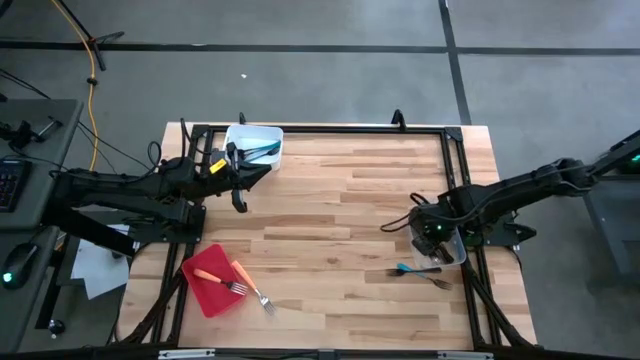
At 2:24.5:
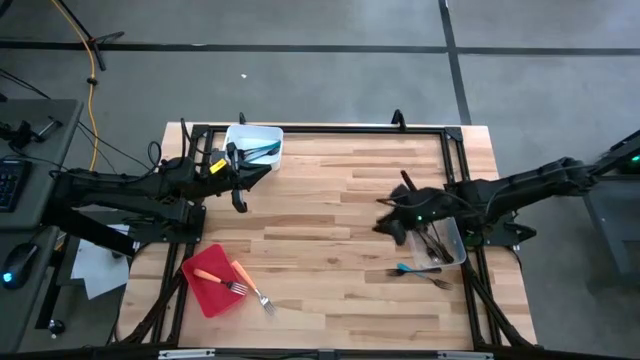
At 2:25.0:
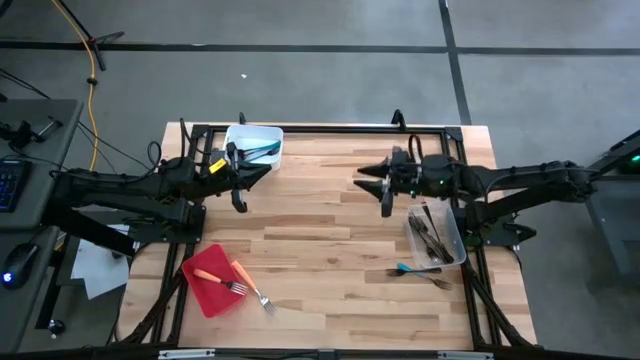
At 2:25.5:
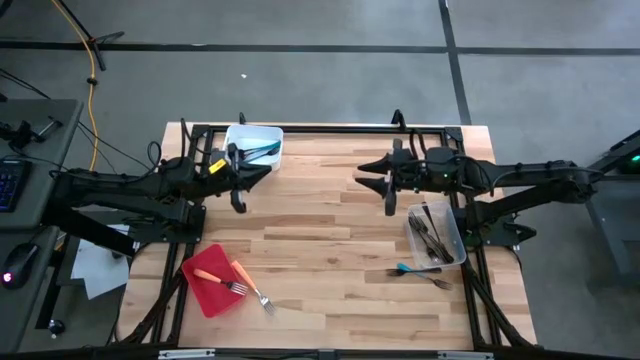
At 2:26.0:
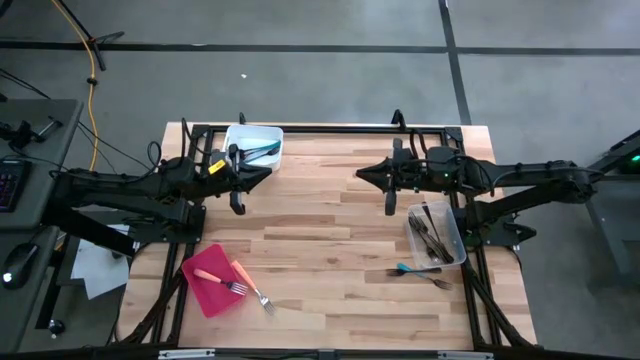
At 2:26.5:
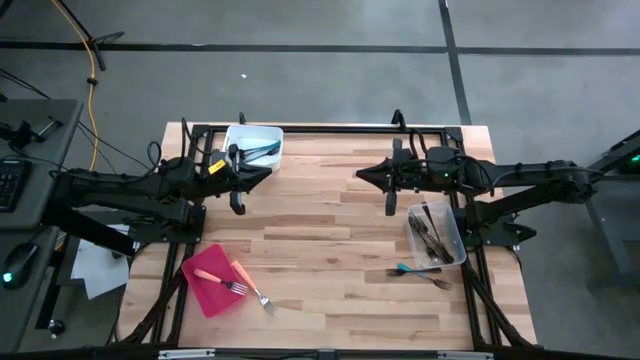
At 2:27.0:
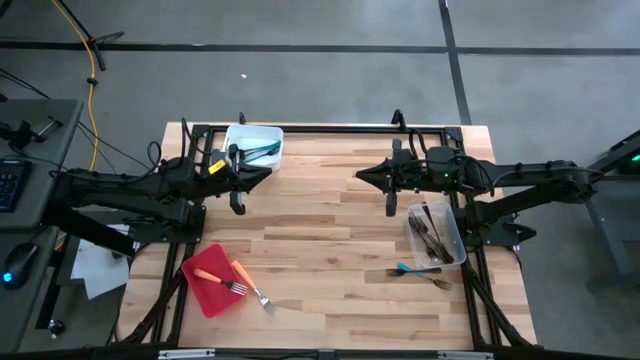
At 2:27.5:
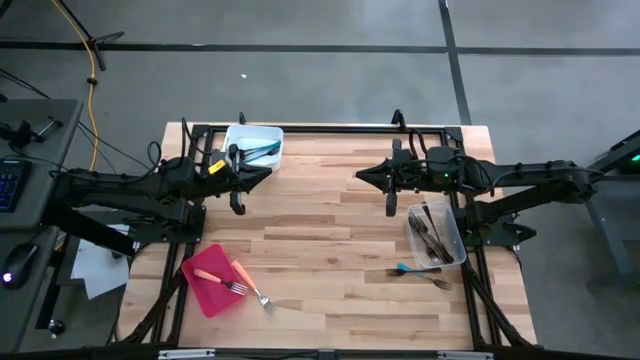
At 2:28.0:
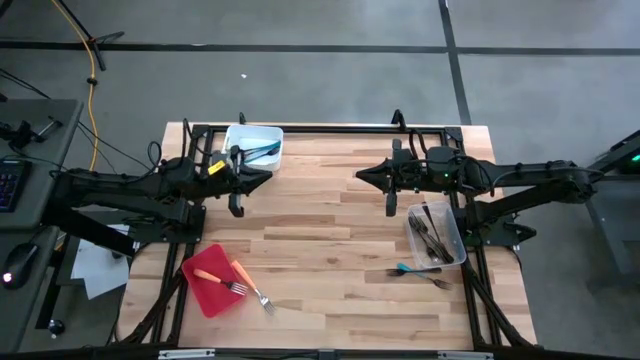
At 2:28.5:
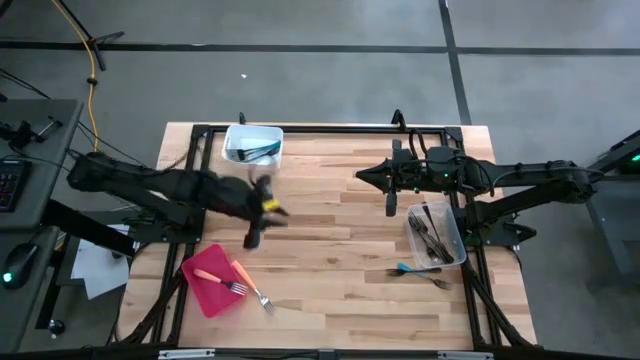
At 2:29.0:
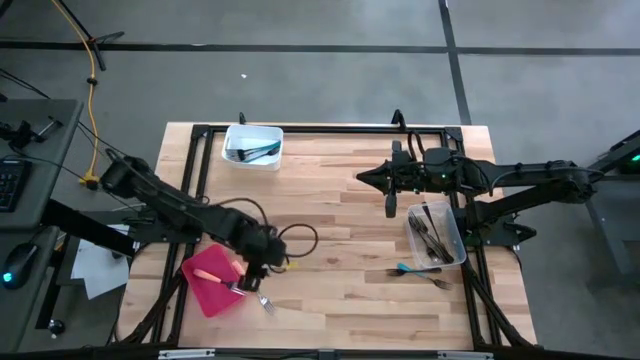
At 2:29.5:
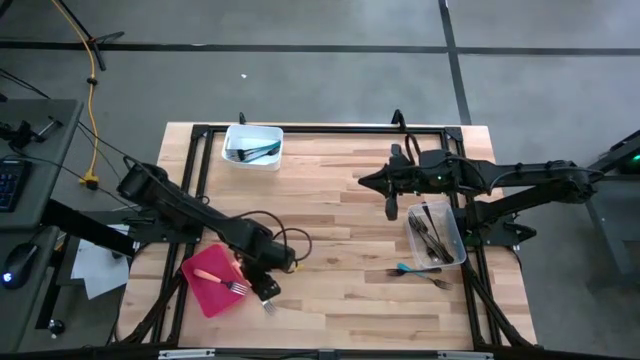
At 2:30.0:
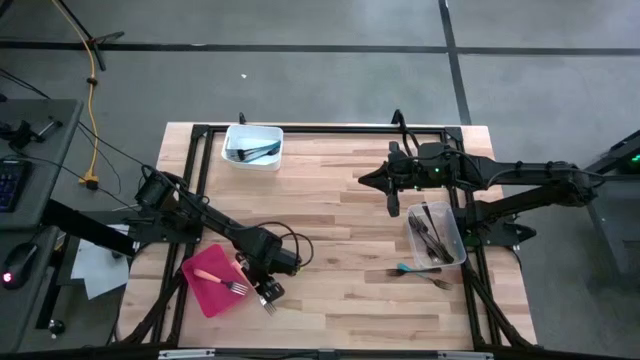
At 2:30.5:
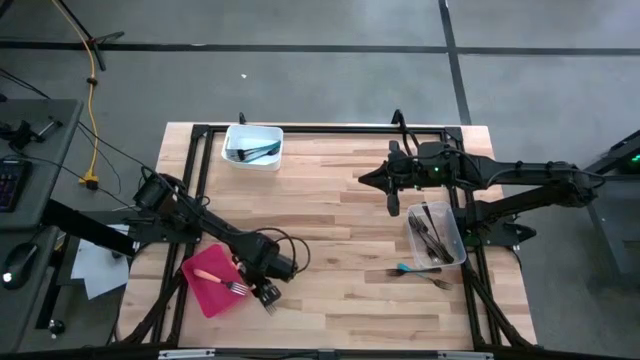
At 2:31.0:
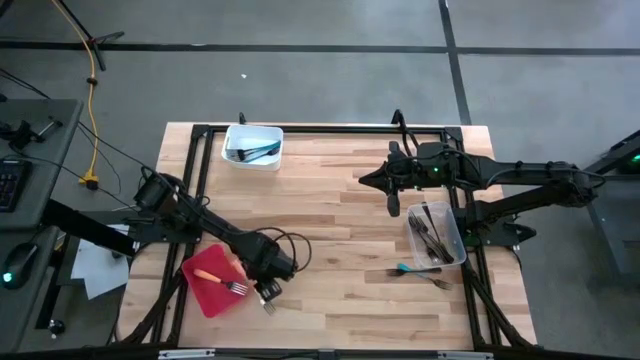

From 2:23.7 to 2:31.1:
Task: Sort silverware by color (type)
Put the orange fork into the red bin

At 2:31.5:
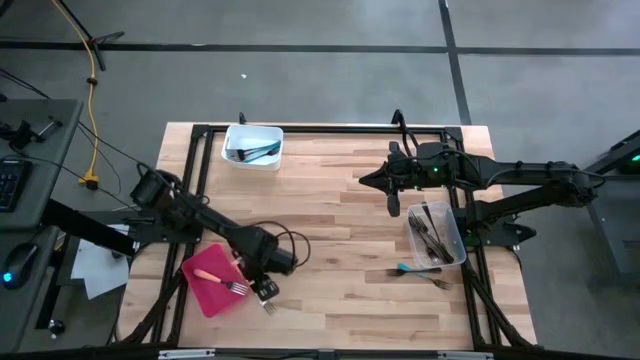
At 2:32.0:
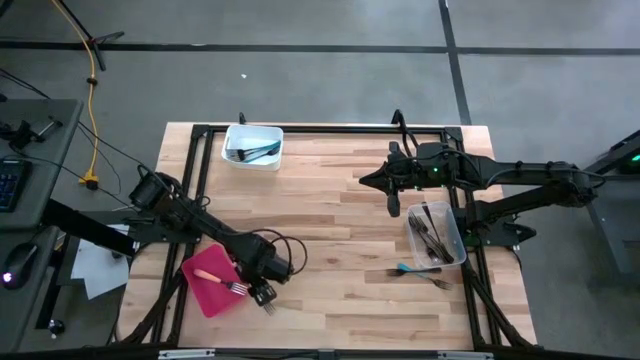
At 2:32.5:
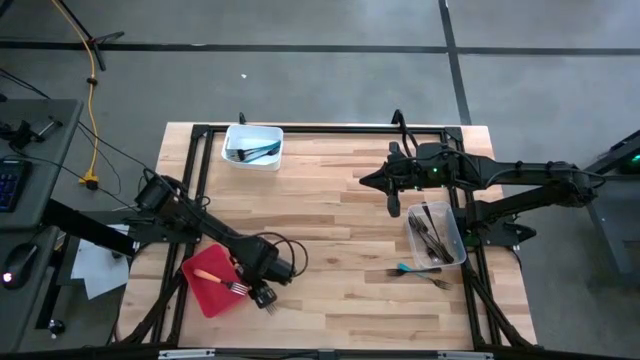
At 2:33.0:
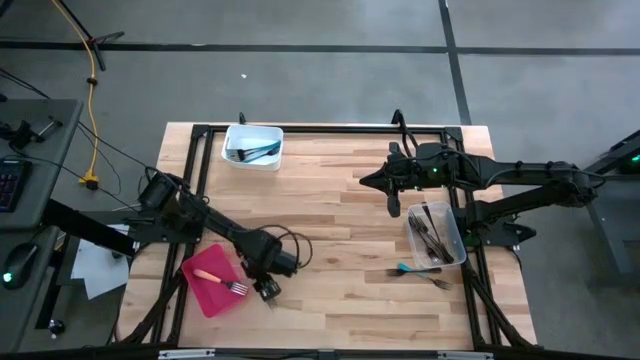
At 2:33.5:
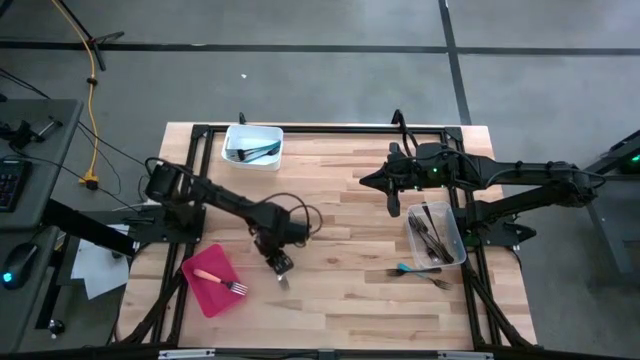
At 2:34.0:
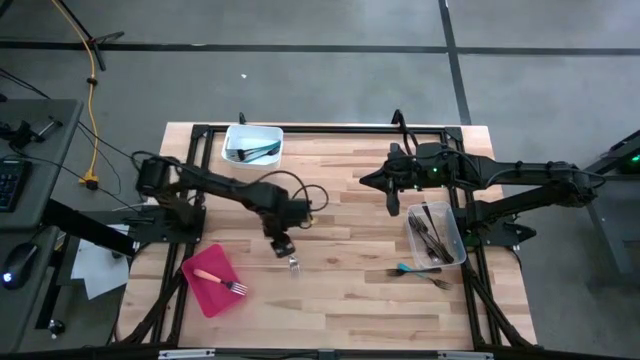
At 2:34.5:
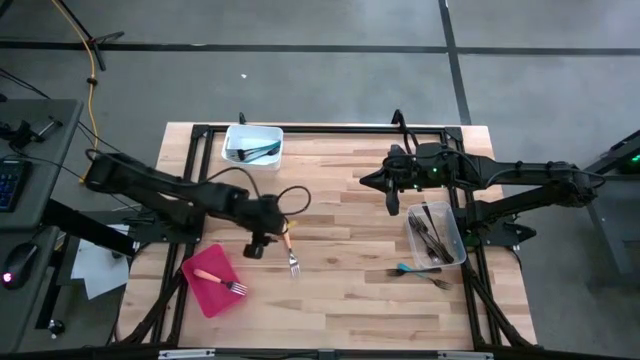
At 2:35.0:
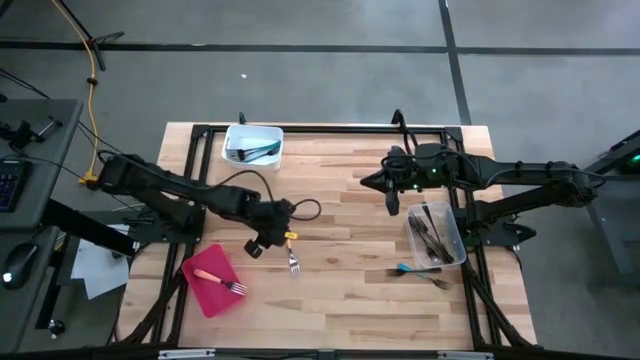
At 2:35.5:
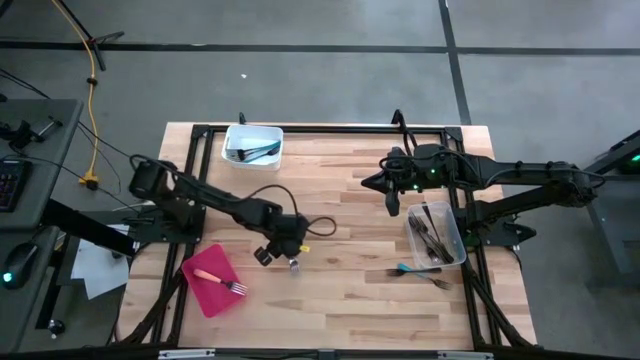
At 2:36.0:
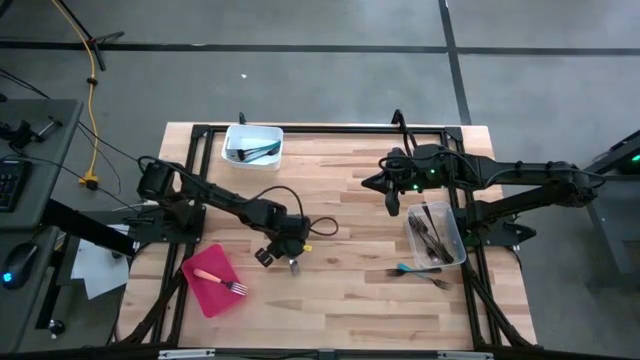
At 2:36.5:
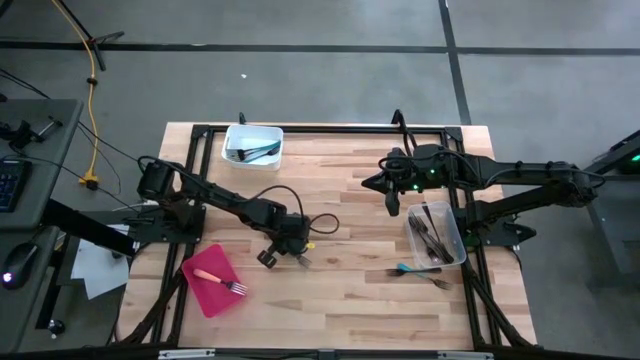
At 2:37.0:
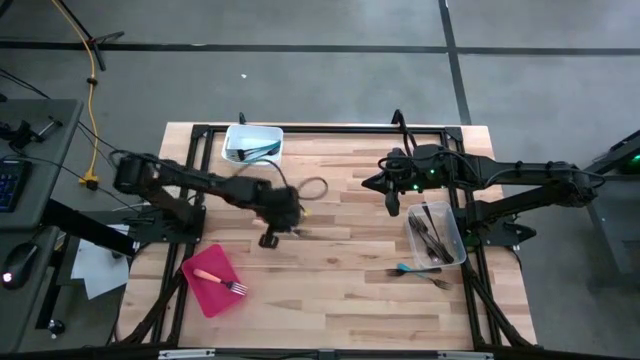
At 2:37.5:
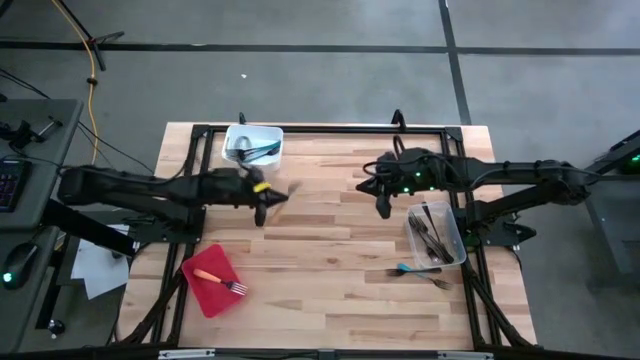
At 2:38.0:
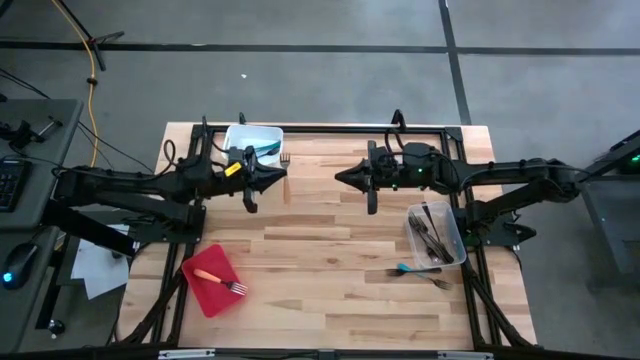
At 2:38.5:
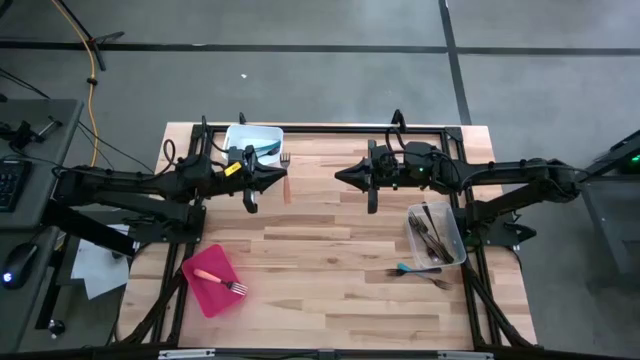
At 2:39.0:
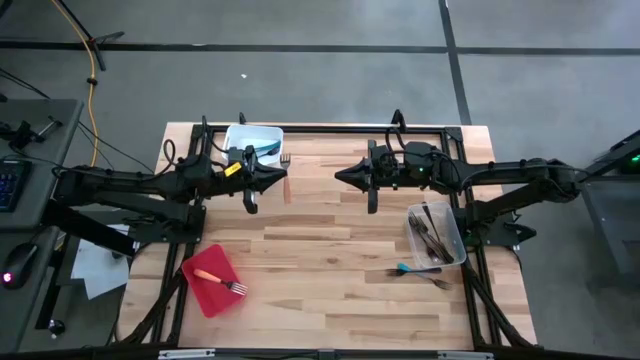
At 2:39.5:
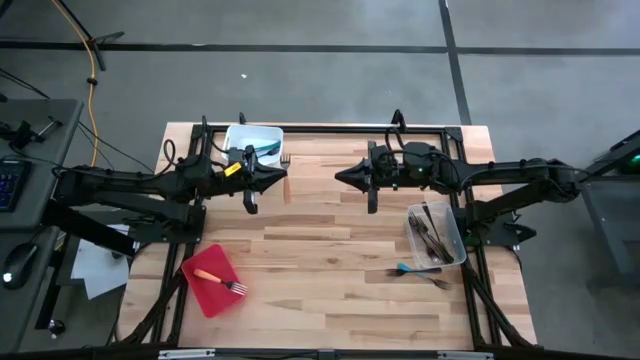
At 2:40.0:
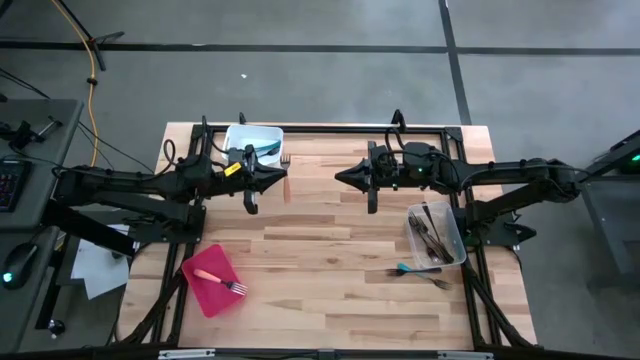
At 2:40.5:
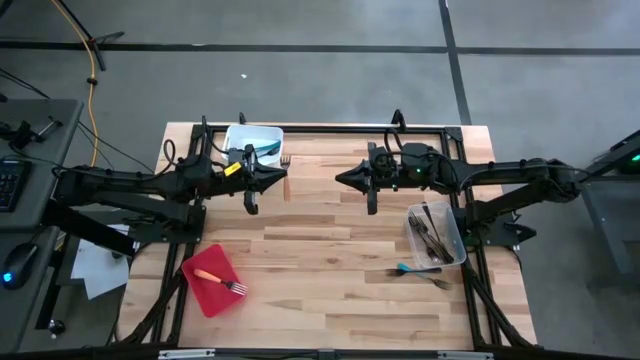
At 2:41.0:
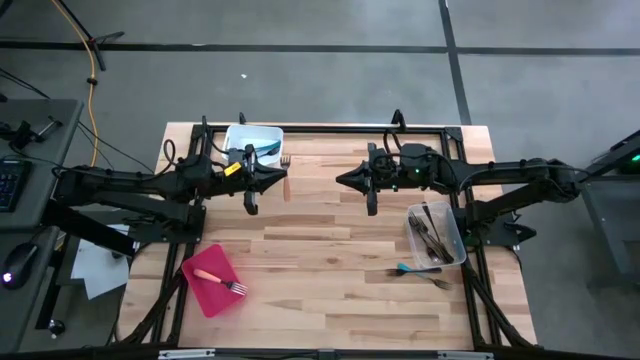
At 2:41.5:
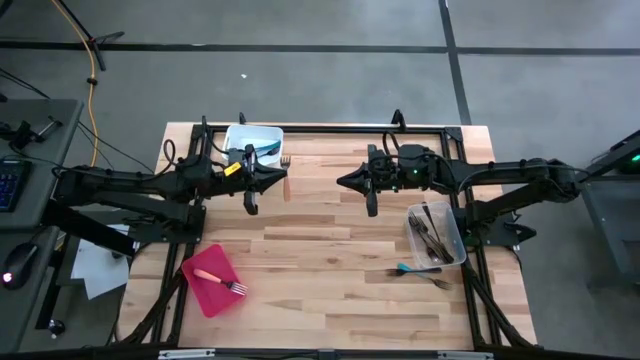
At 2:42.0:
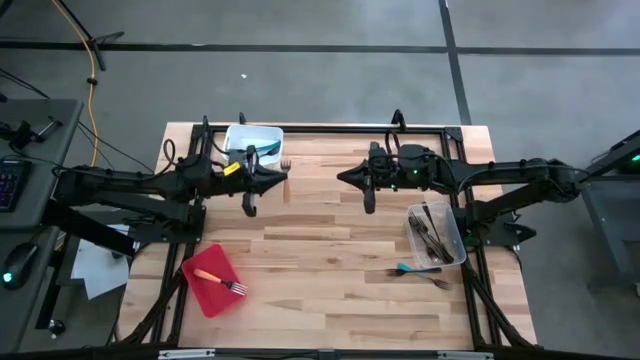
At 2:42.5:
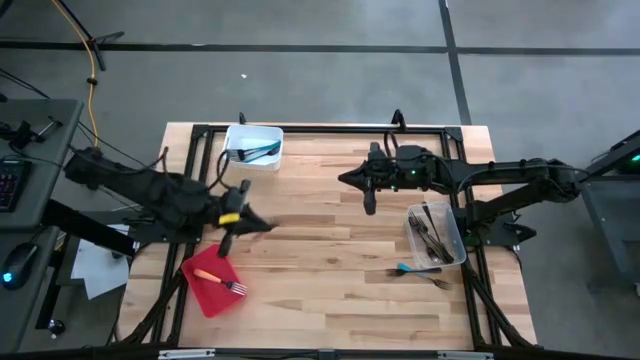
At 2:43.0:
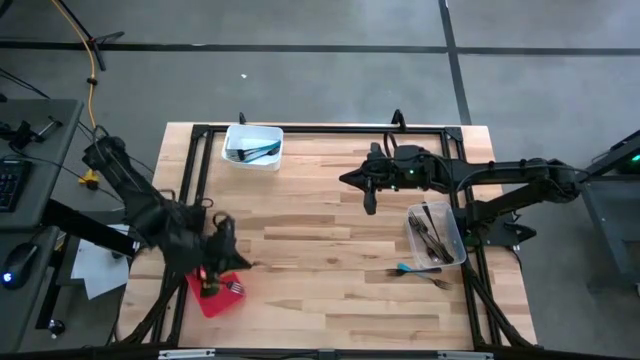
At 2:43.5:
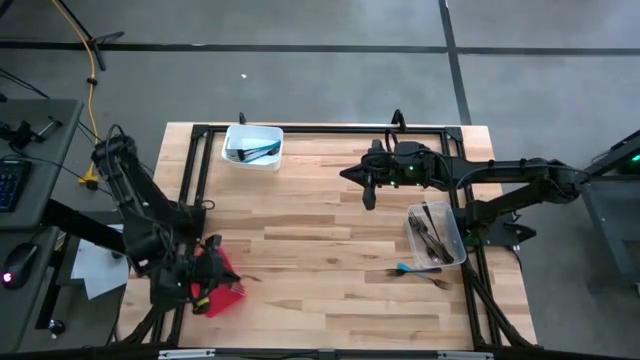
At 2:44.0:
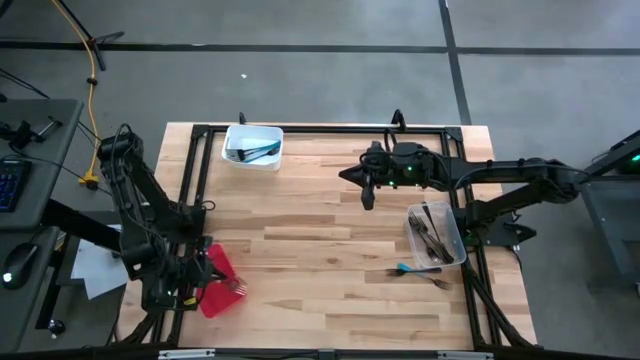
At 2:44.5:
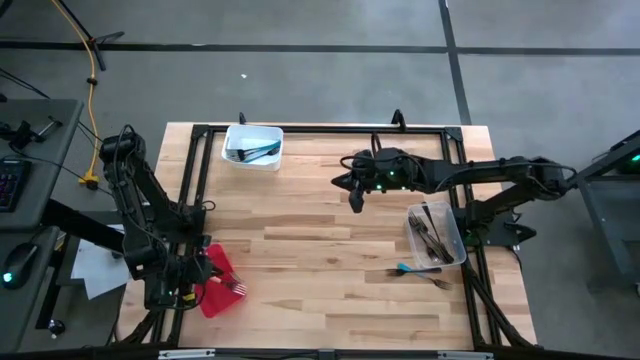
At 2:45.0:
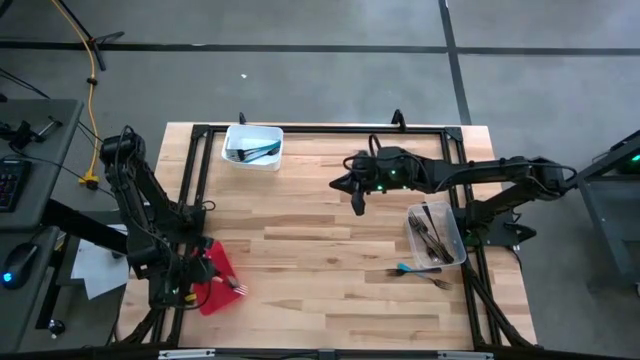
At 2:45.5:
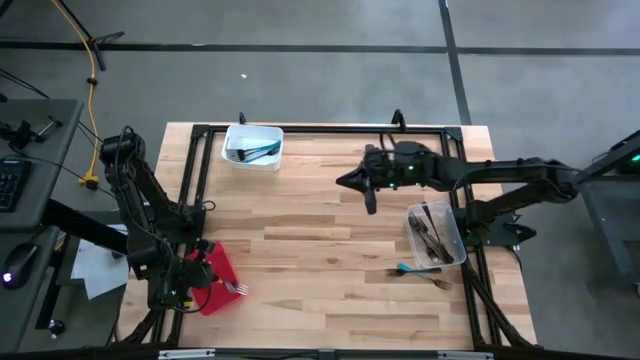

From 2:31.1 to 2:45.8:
Put the orange fork into the red bin
